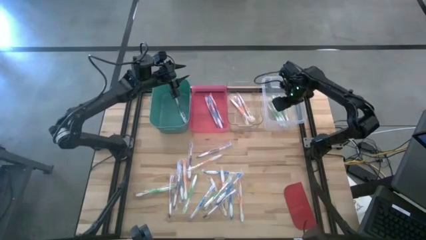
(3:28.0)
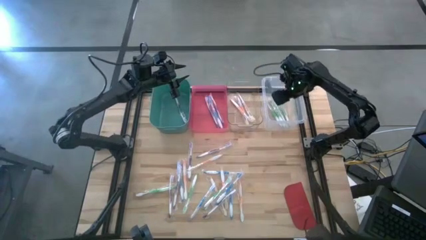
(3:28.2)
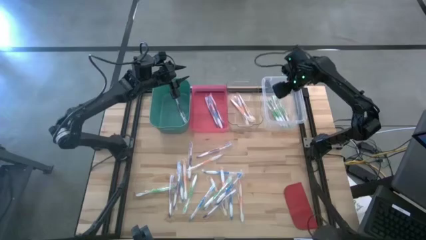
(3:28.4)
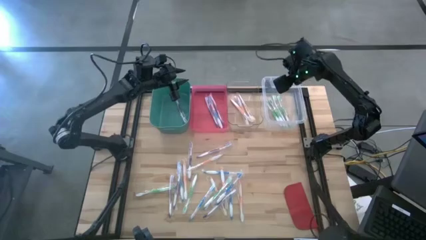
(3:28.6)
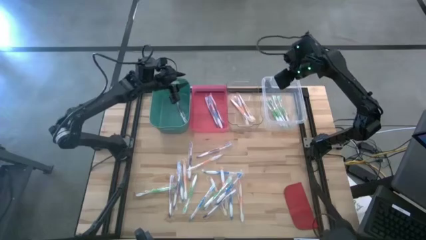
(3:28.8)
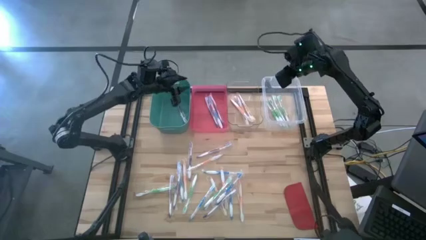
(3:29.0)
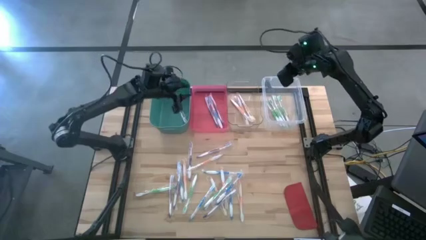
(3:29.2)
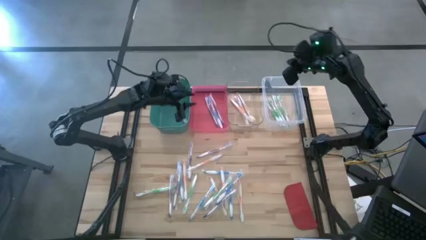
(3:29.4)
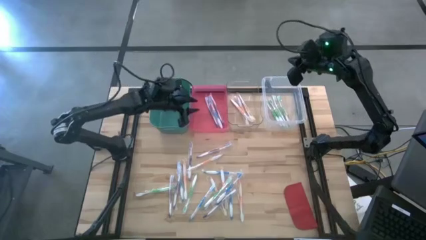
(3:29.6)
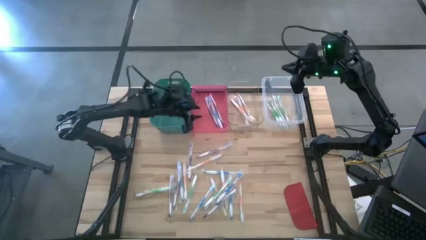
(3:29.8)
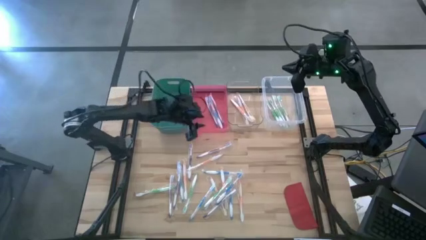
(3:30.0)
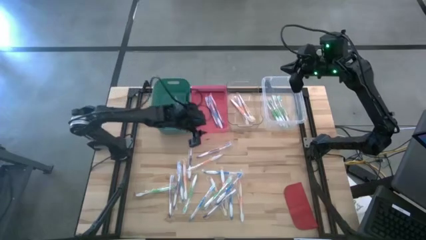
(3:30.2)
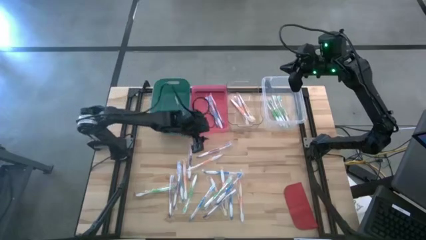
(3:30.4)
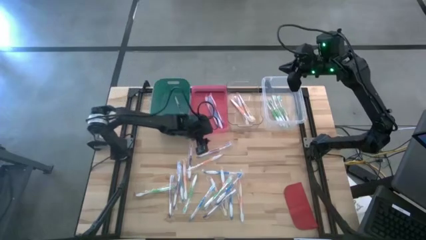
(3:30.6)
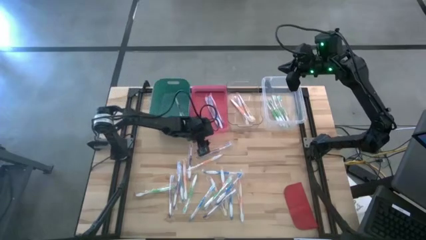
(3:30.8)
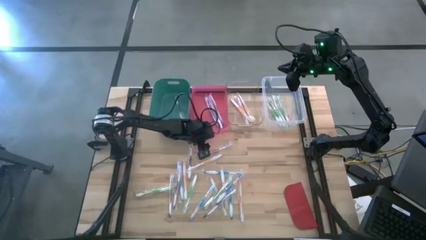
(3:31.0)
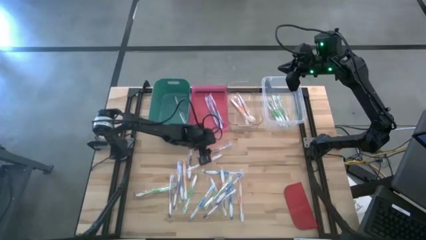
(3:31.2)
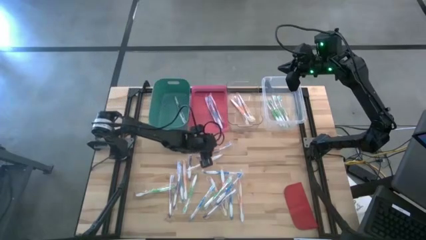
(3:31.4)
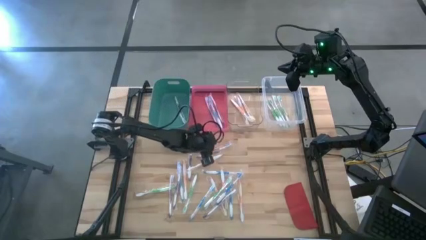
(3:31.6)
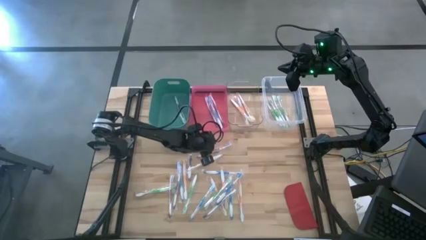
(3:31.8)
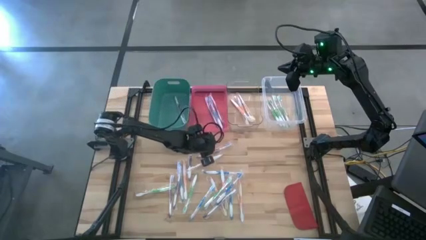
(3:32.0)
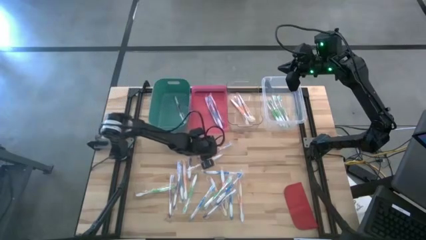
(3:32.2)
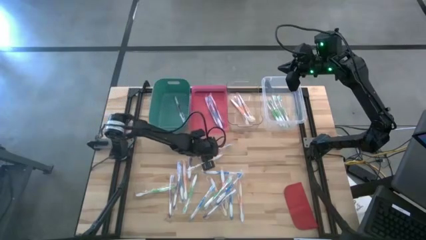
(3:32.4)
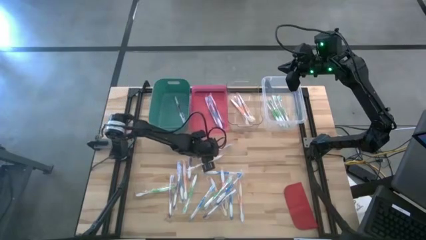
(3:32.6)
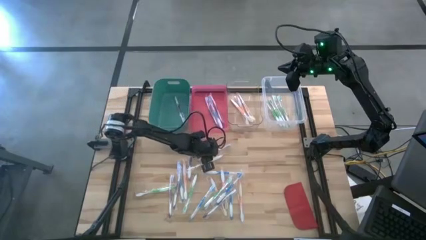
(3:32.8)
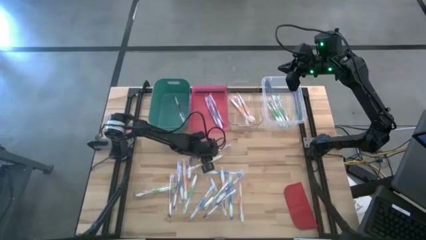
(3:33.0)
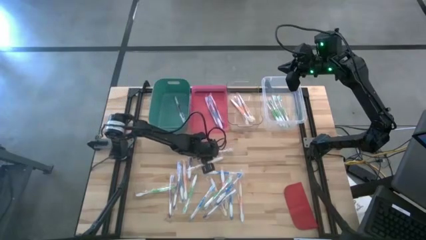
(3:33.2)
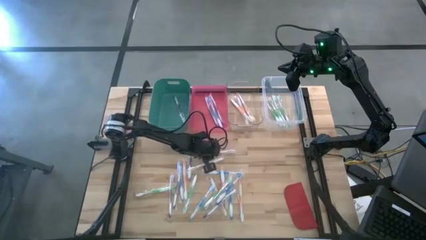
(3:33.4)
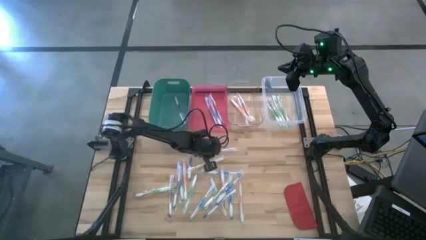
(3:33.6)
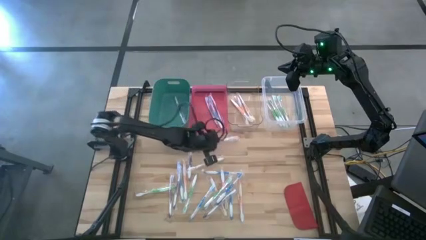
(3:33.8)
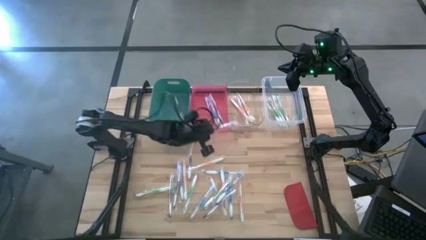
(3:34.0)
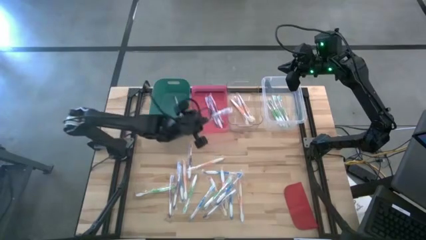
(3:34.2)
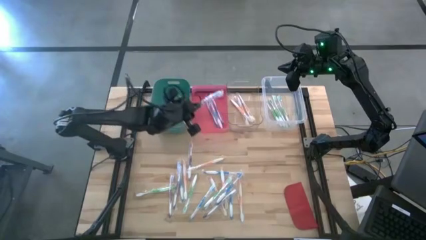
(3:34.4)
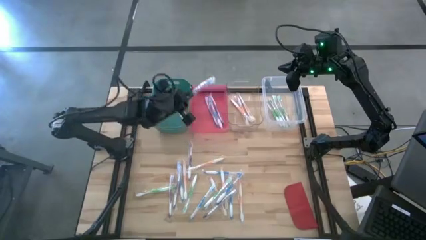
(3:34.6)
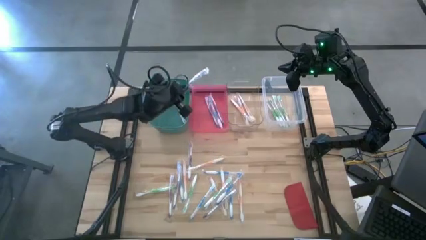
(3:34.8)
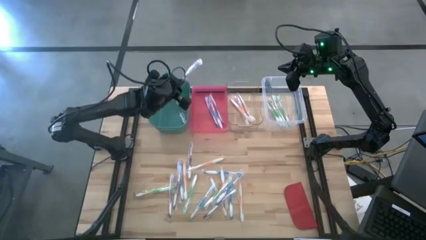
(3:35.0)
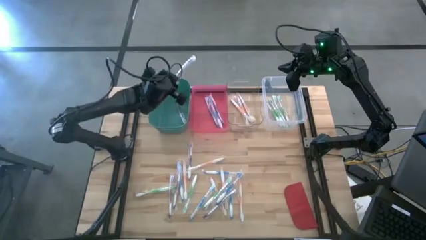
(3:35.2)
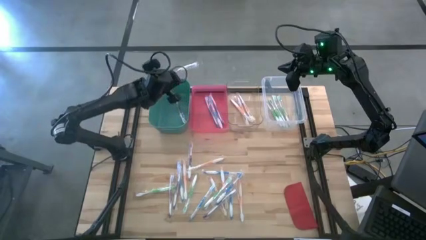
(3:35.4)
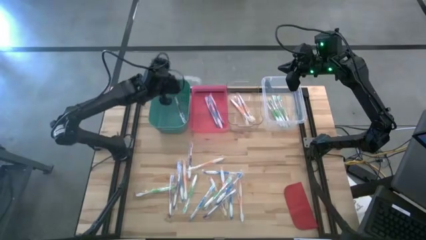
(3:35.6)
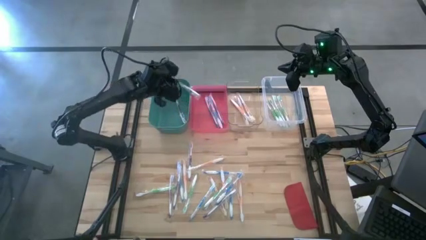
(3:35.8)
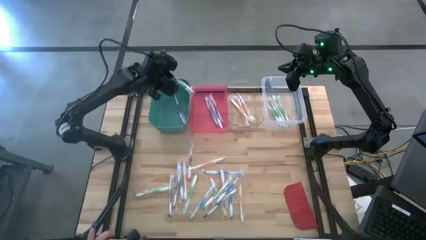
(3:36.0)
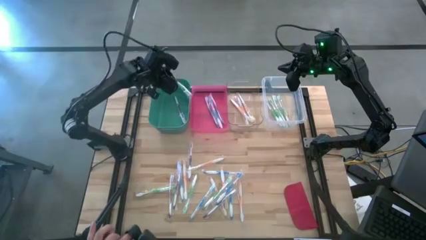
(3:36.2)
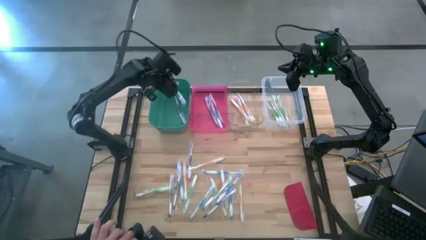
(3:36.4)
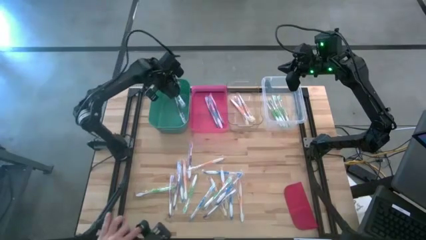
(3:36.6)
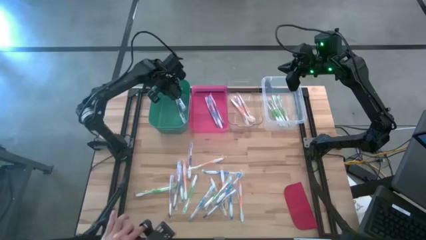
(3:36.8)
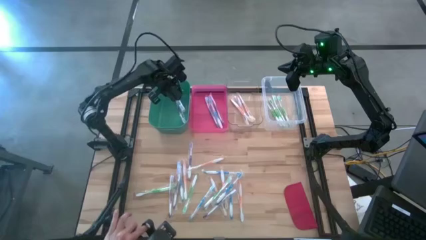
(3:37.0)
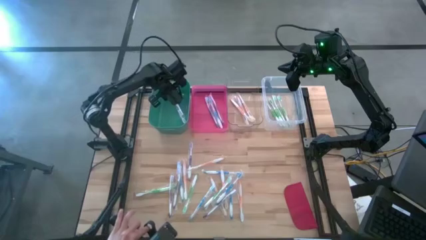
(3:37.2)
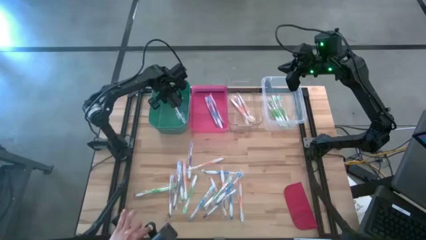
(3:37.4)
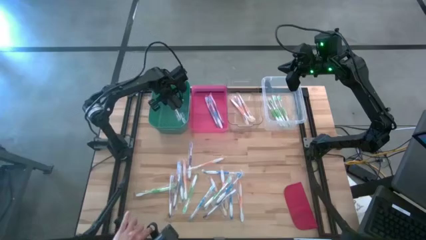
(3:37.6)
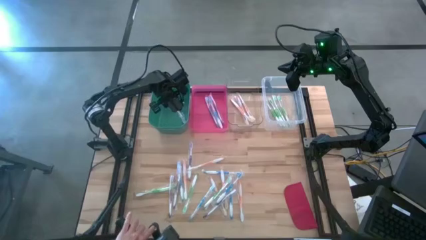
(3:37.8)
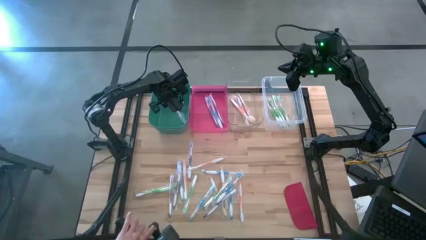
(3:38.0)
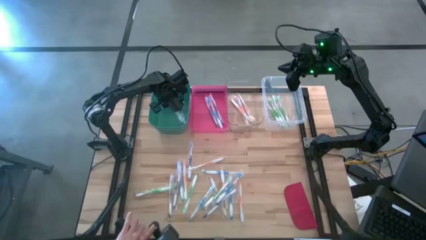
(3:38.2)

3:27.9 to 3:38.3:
Task: Pick & Place Toothbrushes
Put the violet toothbrush into the green bin

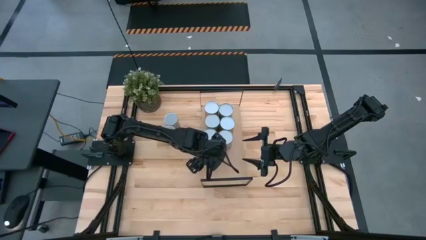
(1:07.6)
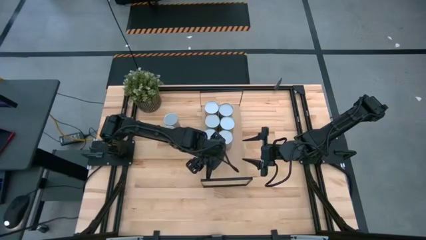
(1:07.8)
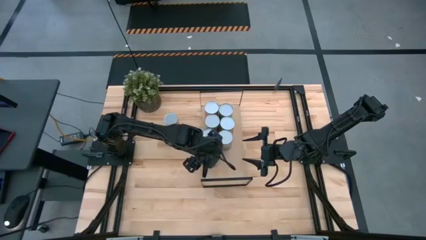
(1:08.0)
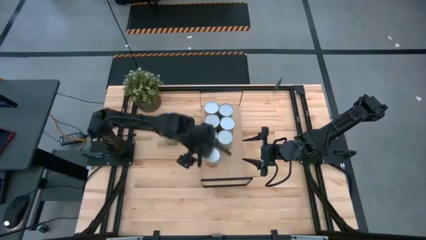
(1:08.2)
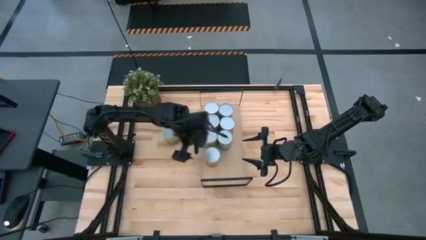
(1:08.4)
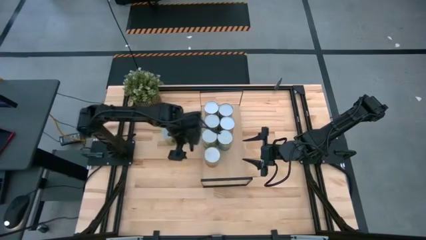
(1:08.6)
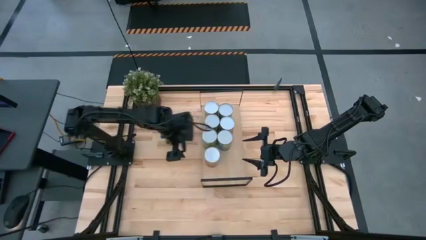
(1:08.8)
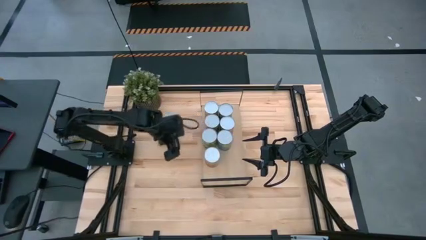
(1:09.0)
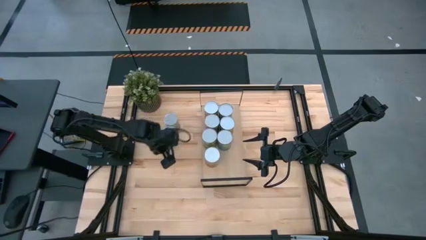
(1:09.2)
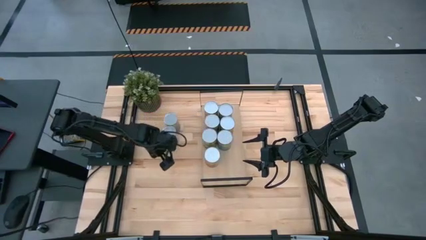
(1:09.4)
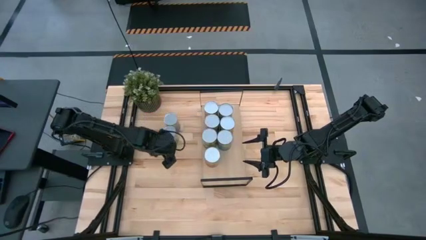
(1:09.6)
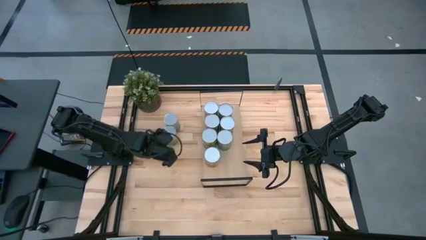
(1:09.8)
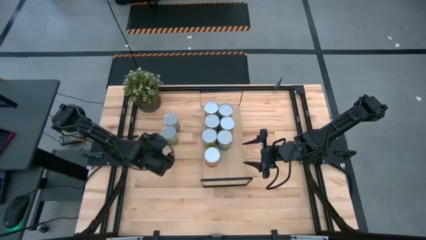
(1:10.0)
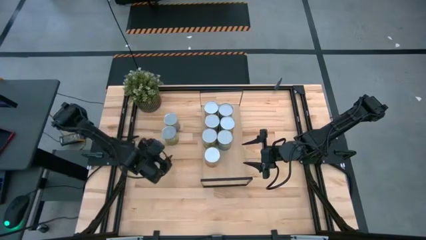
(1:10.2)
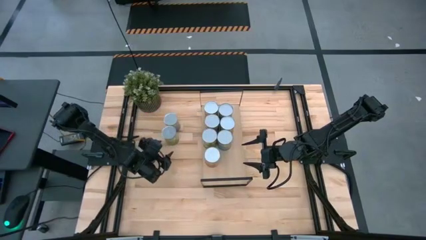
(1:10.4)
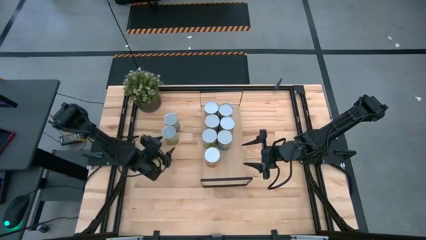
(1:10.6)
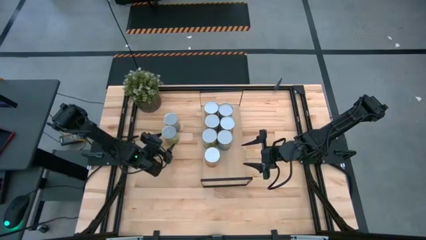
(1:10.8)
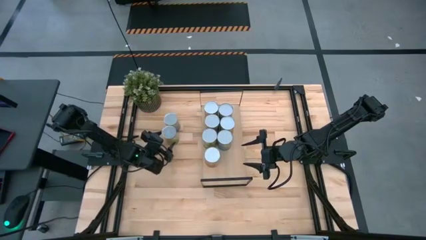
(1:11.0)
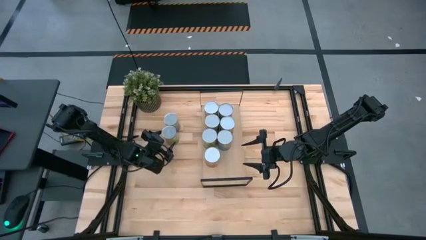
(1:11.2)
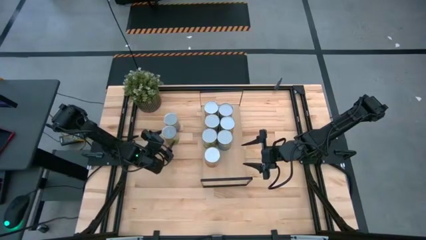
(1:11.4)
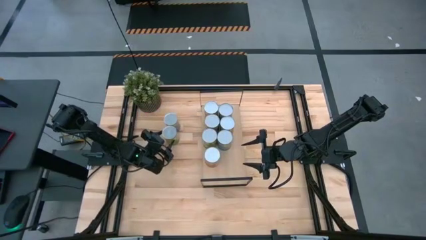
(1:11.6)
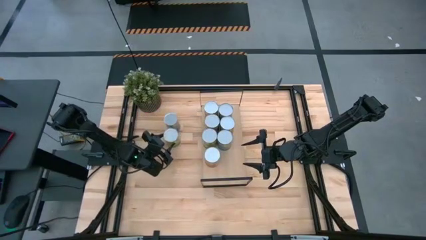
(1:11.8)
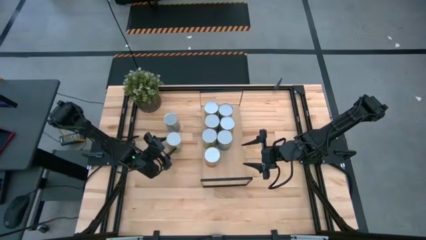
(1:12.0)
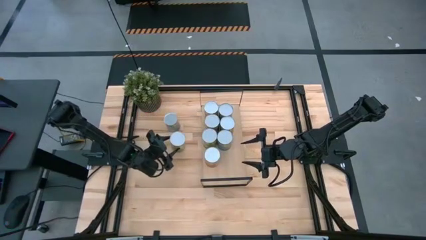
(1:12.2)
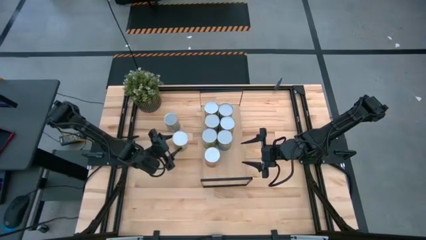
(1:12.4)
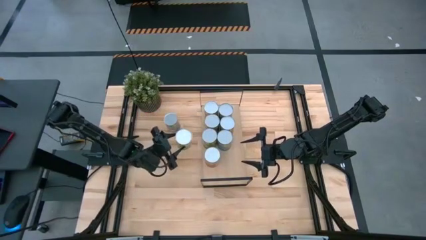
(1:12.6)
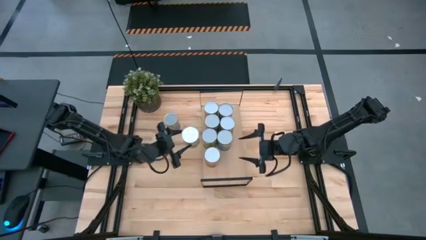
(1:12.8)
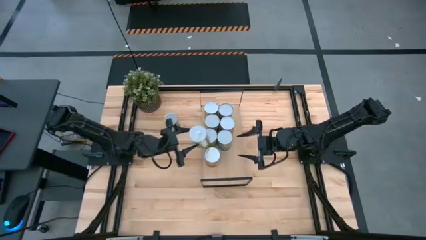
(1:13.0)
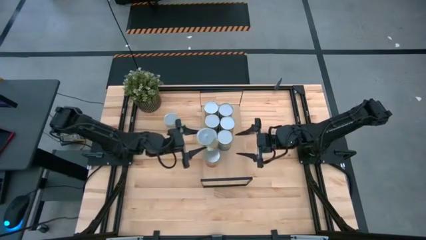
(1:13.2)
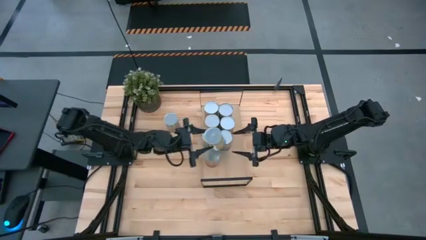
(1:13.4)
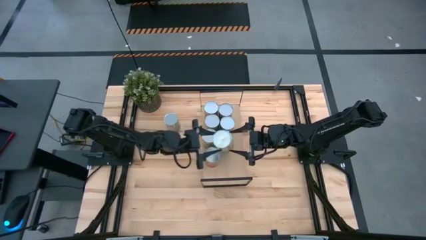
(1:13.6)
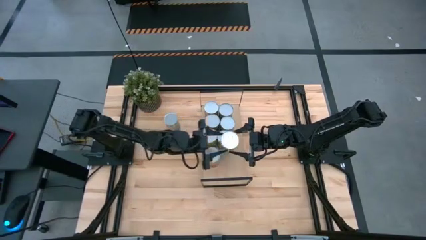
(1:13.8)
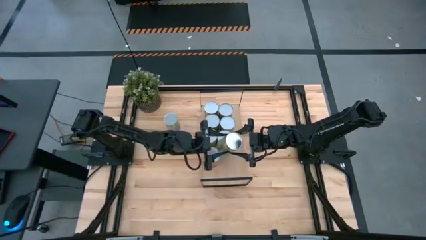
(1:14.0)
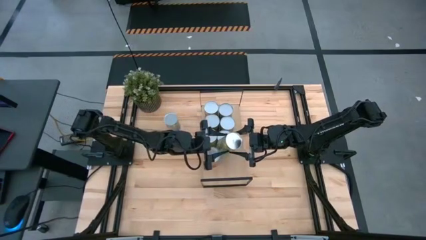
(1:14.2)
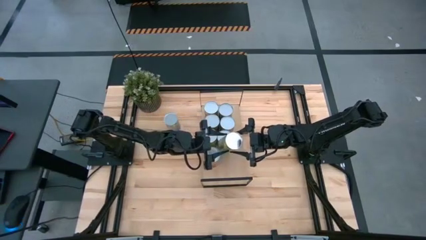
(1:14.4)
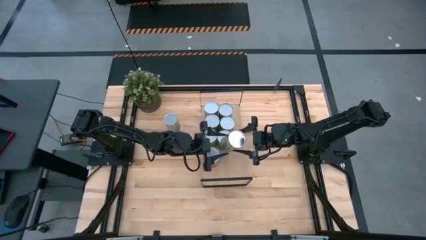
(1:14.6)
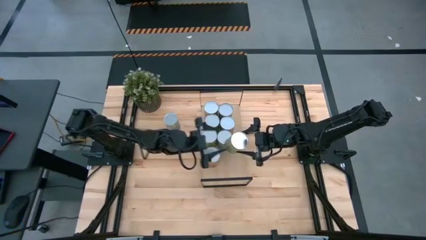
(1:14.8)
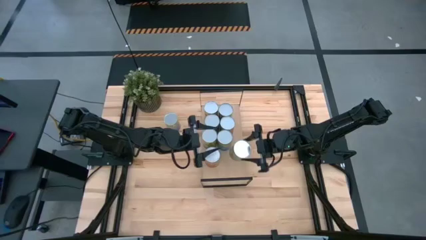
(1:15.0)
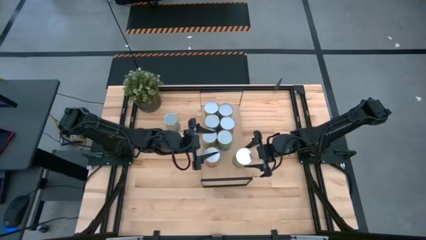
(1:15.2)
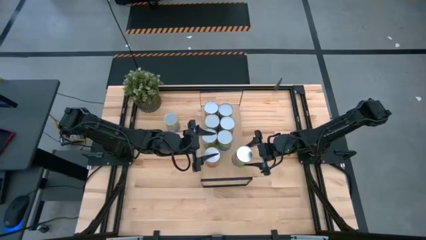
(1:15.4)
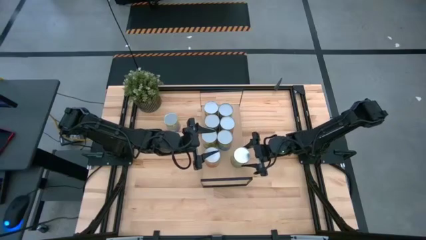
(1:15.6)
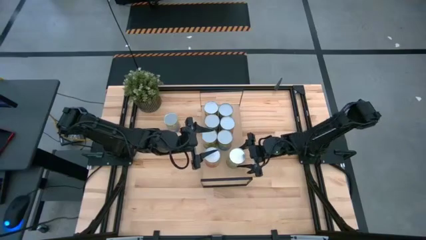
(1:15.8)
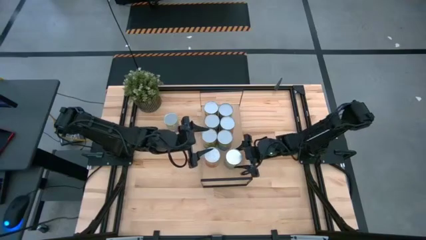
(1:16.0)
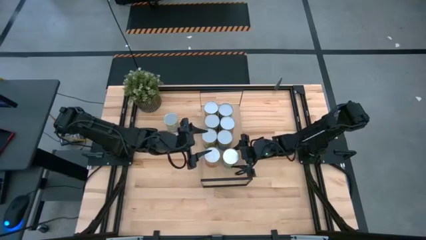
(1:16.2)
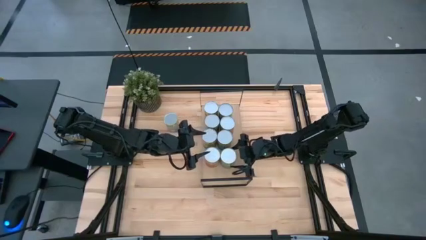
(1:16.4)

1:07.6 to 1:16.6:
Task: Pick and place cans onto a shelf
Put the canned oranges on the shelf
